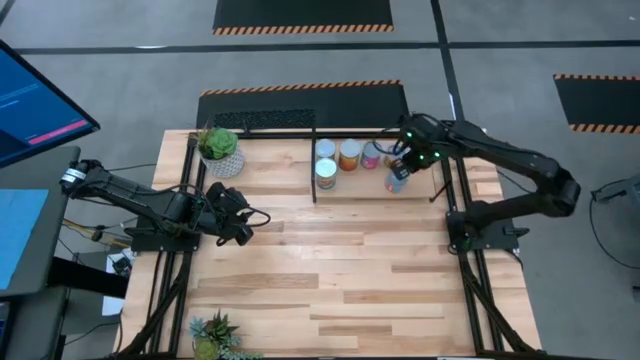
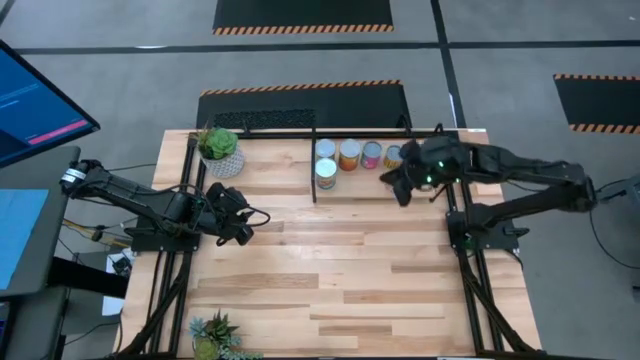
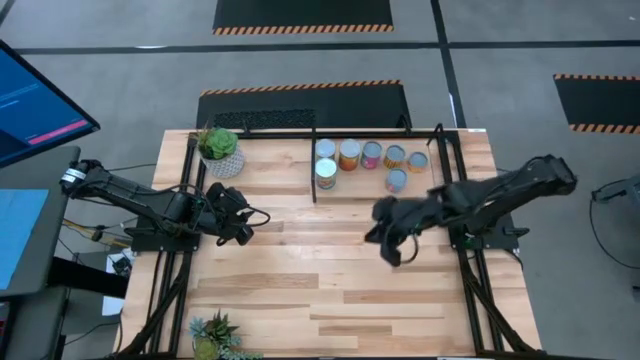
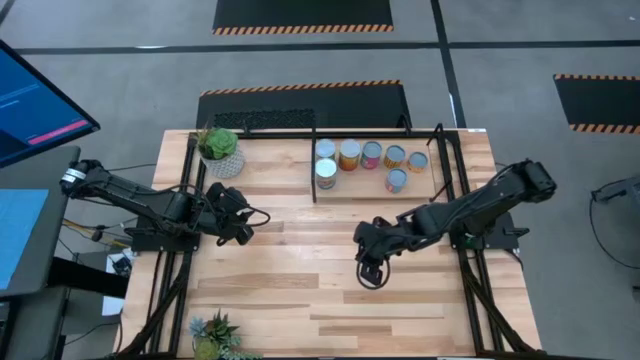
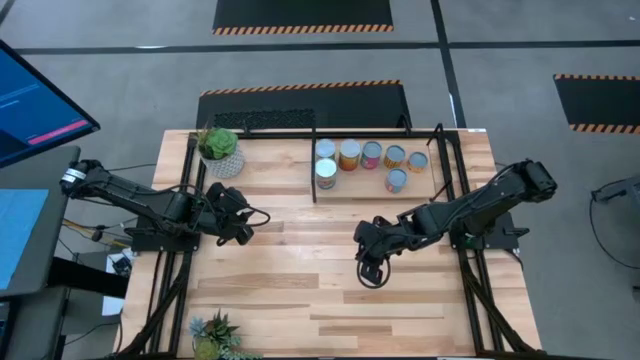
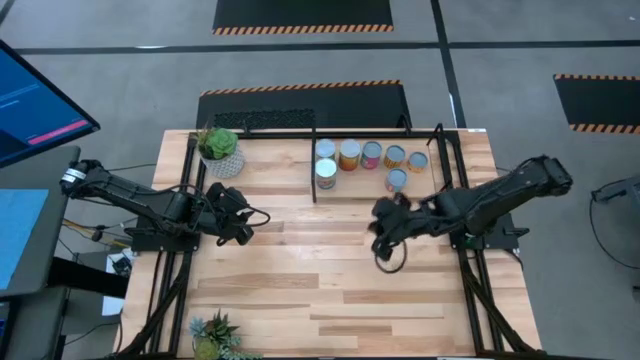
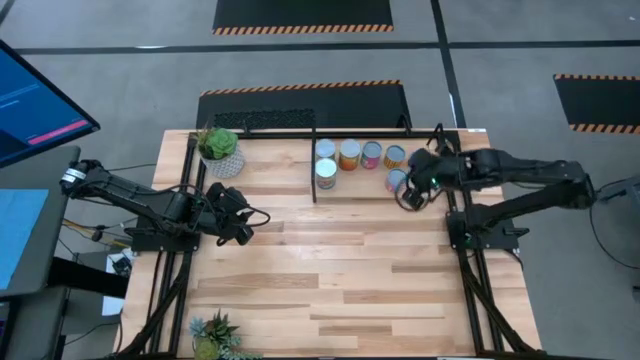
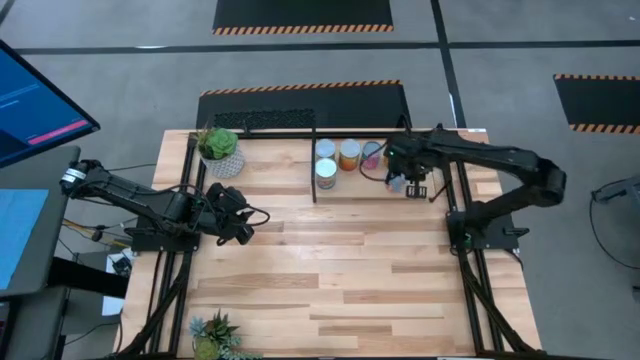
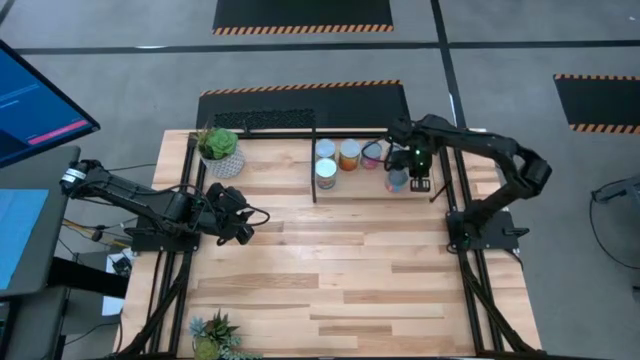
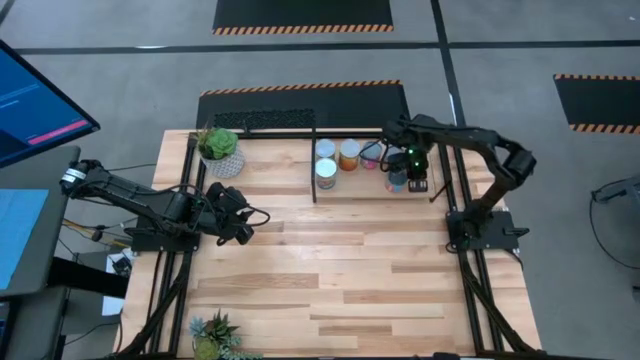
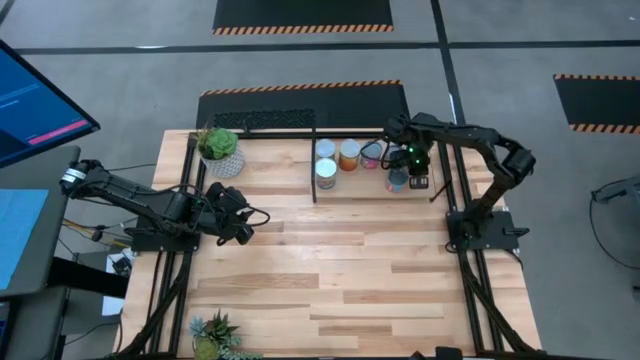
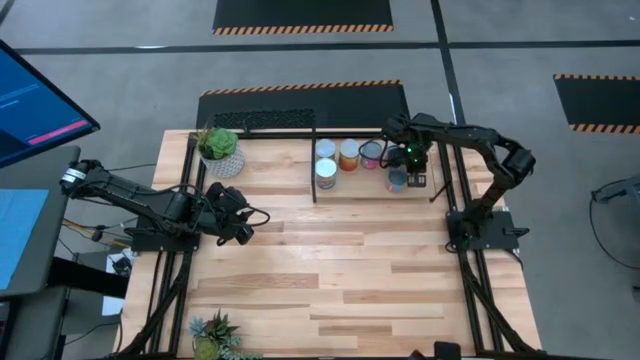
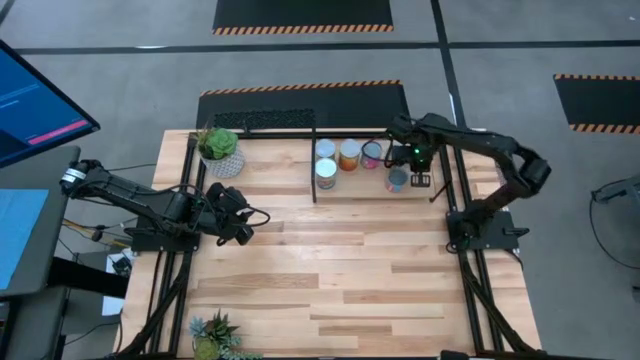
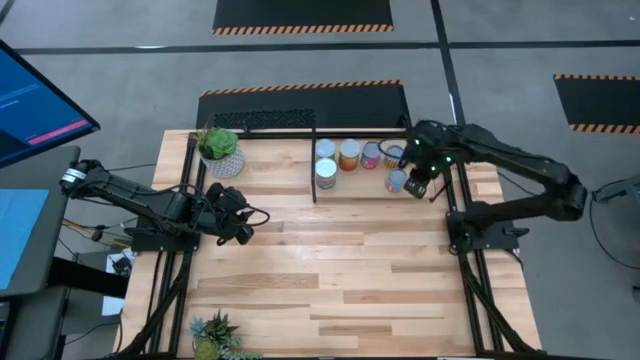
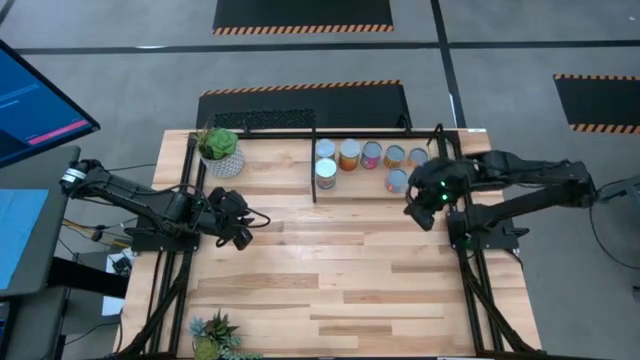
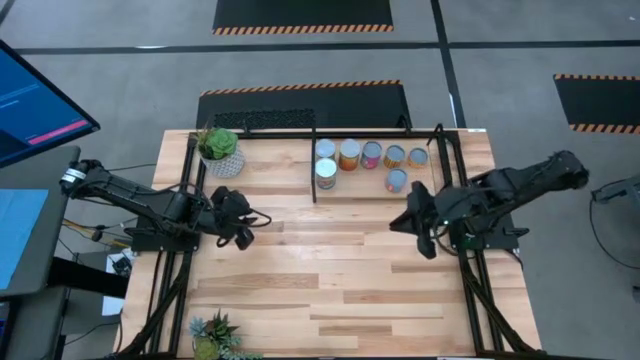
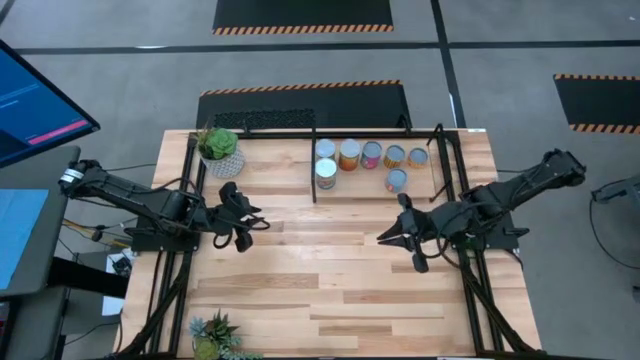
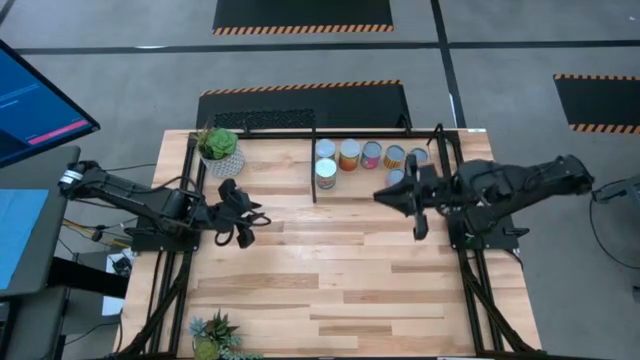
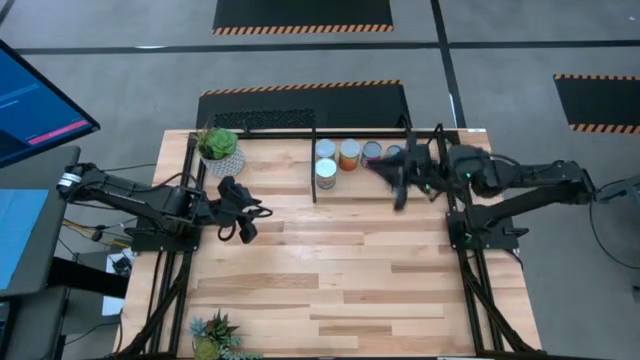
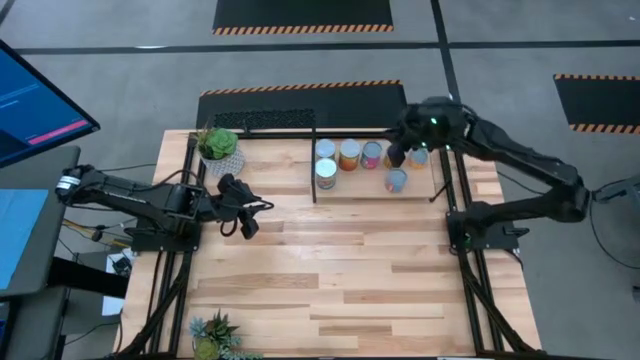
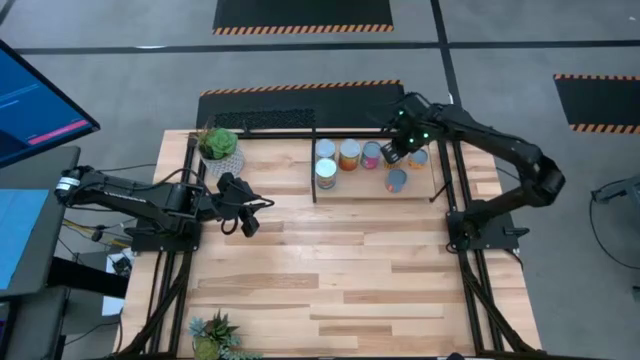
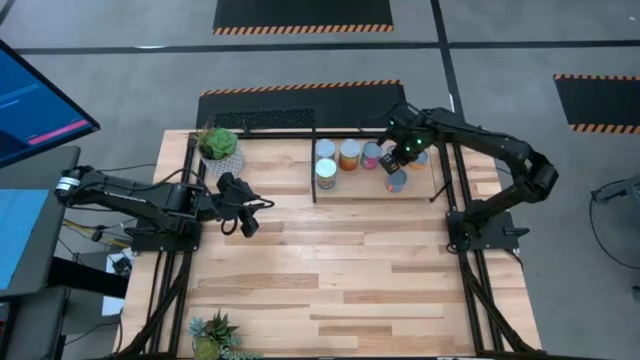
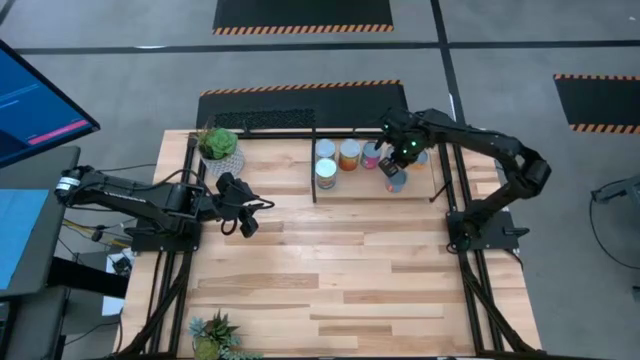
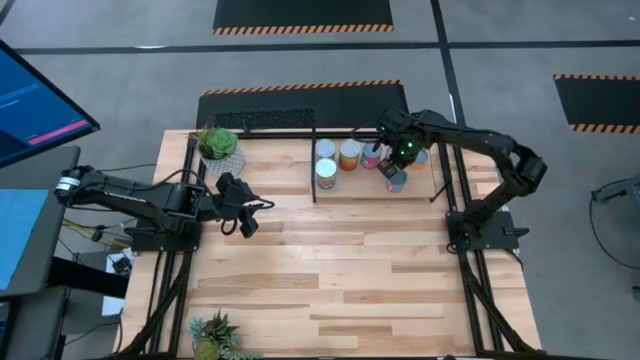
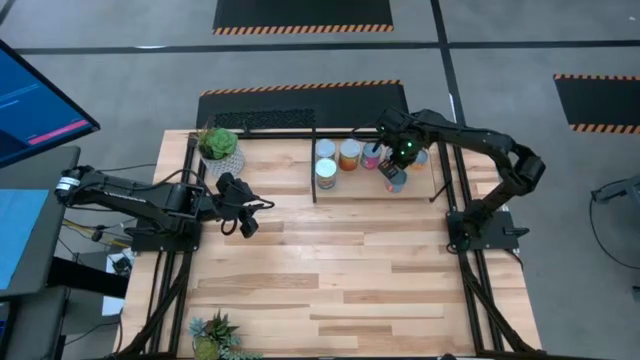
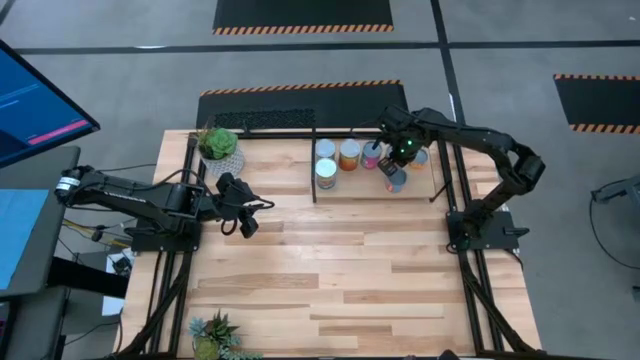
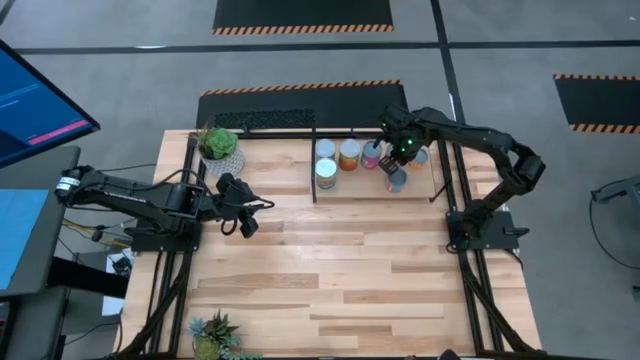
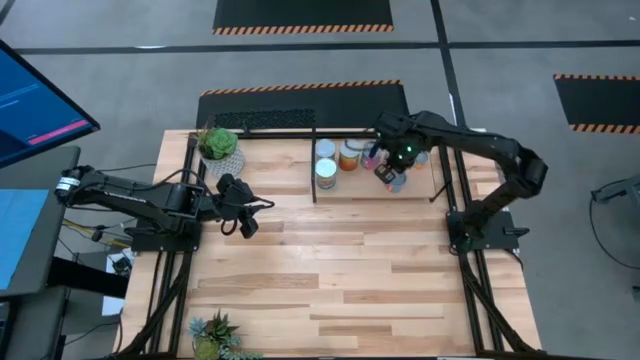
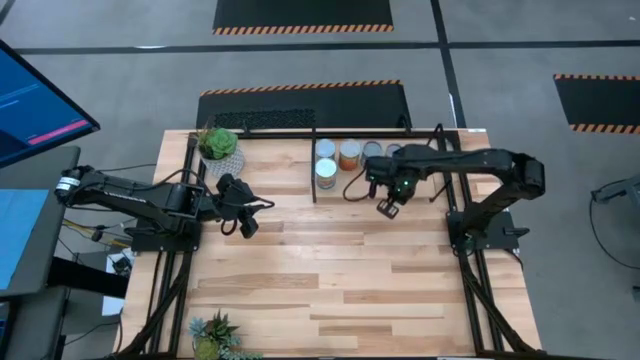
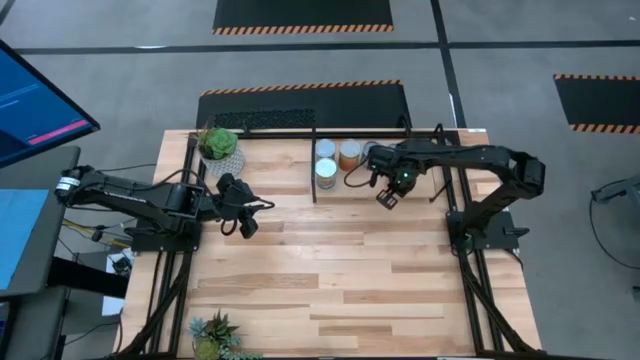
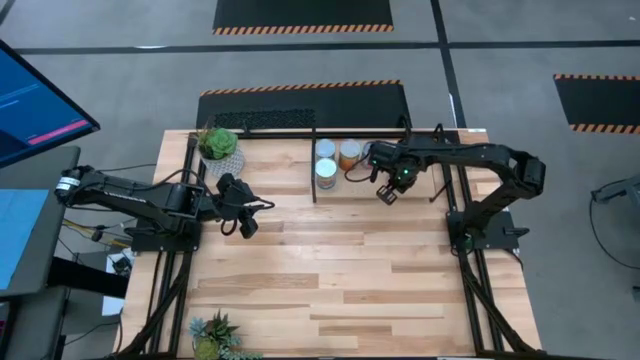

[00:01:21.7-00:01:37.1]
Task: Pick and place cans onto a shelf
Adjust the cans

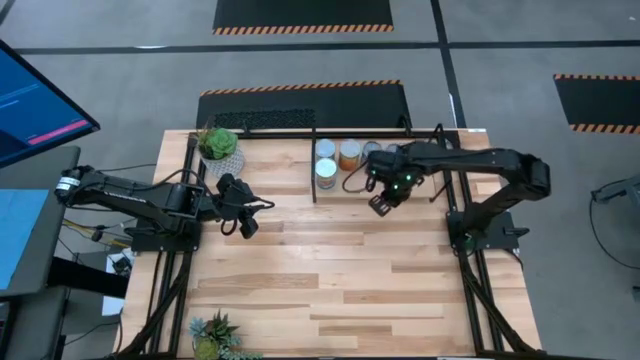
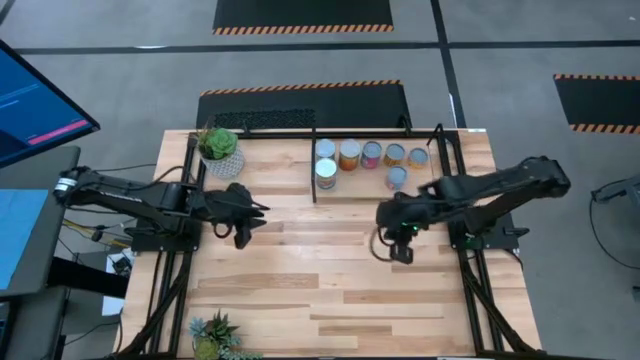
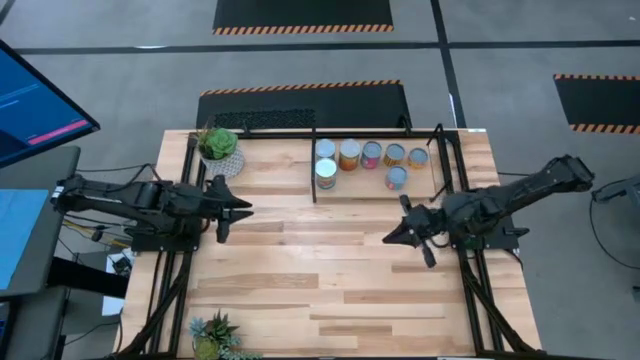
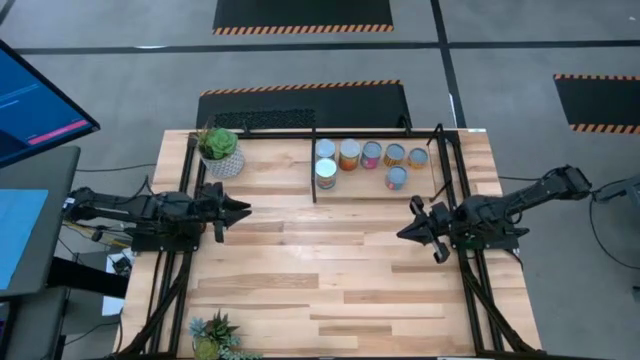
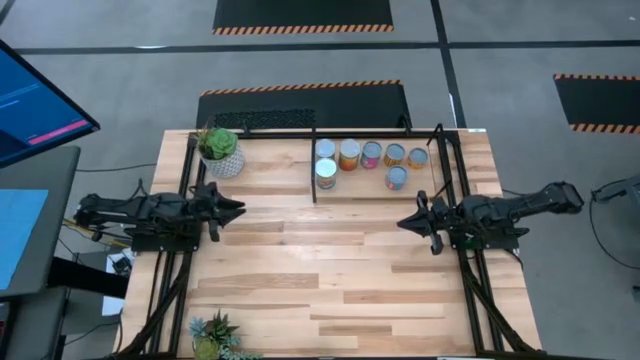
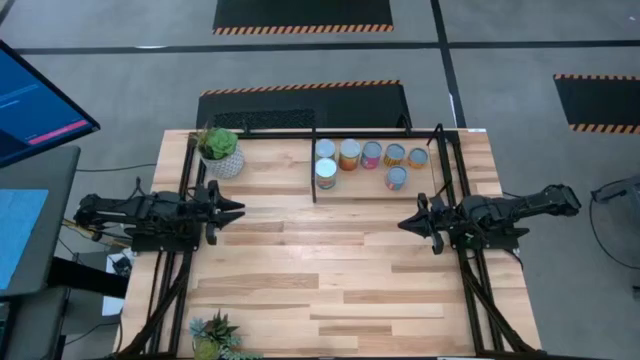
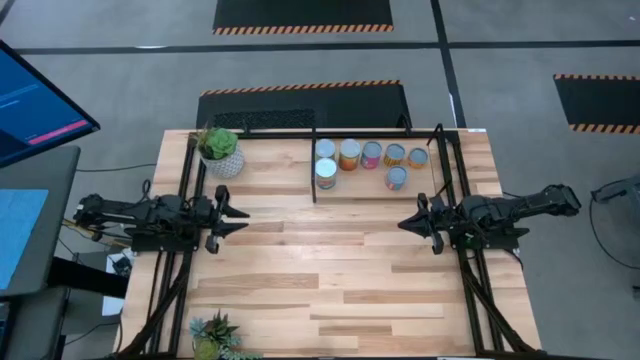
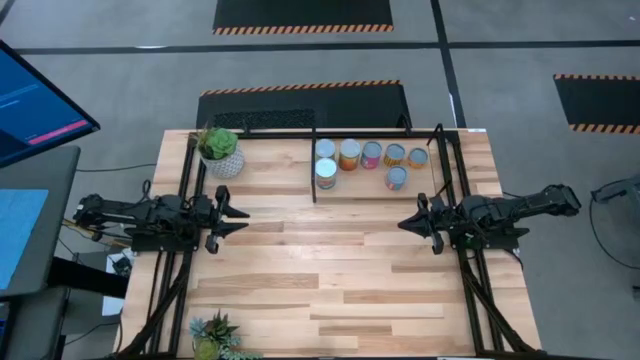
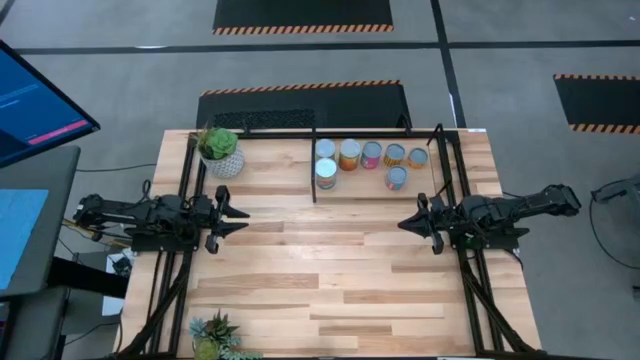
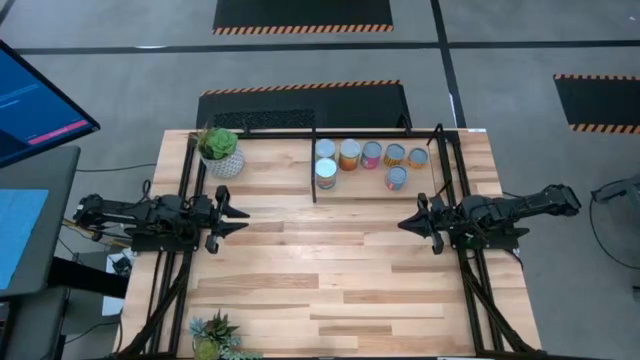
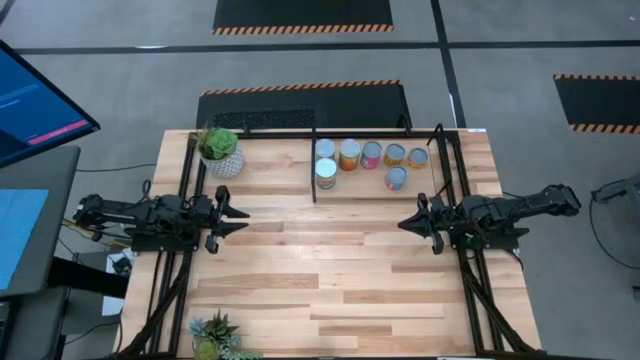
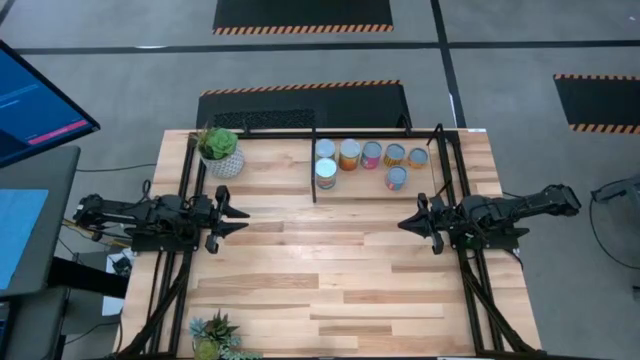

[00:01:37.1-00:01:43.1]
Return to Home Position
